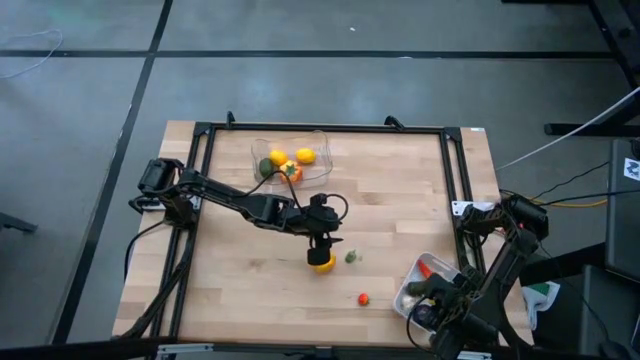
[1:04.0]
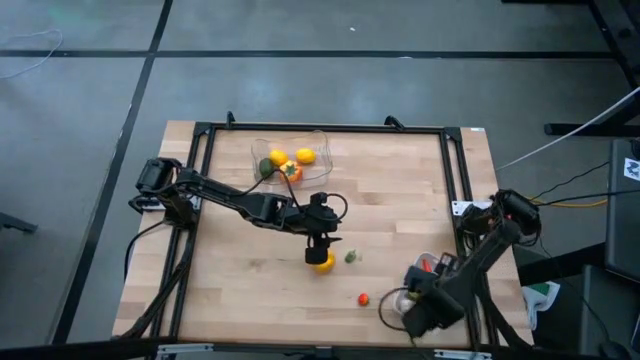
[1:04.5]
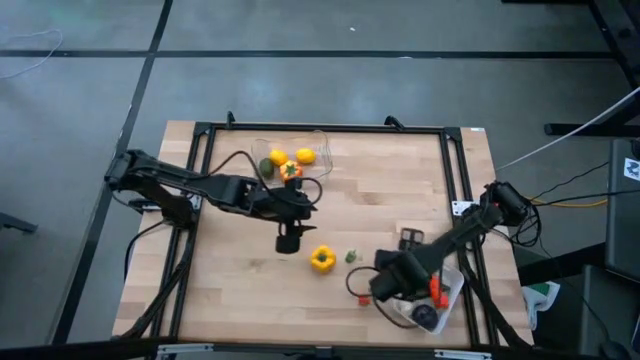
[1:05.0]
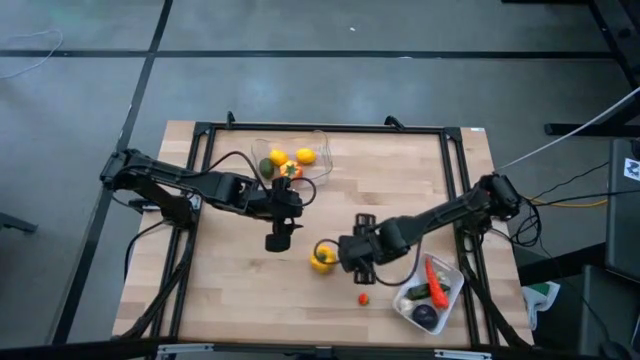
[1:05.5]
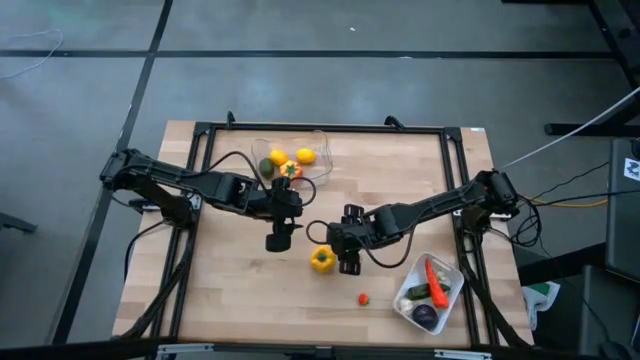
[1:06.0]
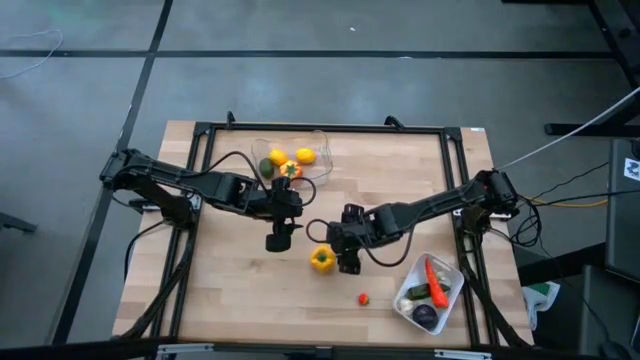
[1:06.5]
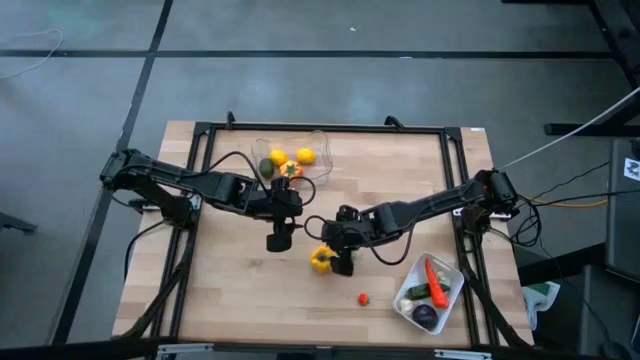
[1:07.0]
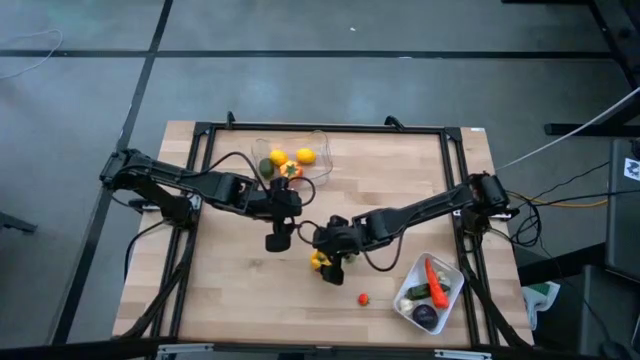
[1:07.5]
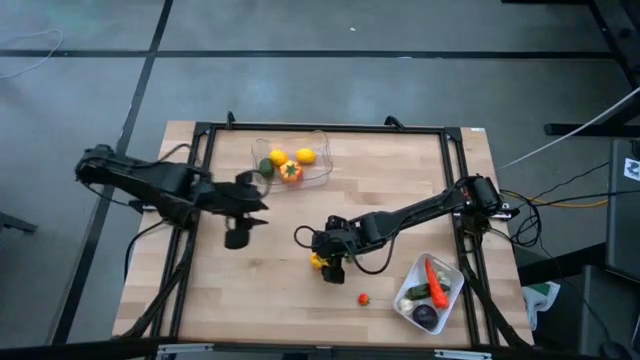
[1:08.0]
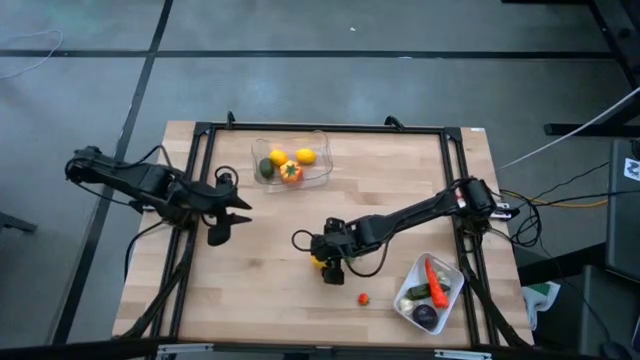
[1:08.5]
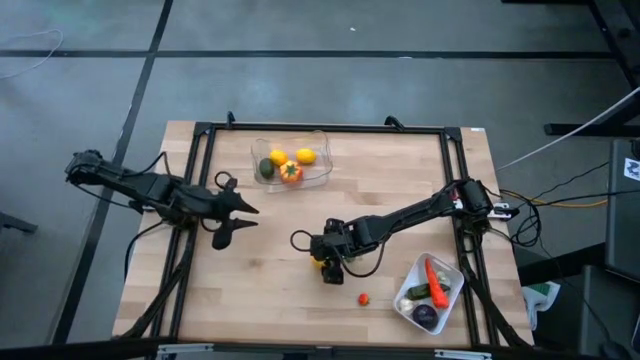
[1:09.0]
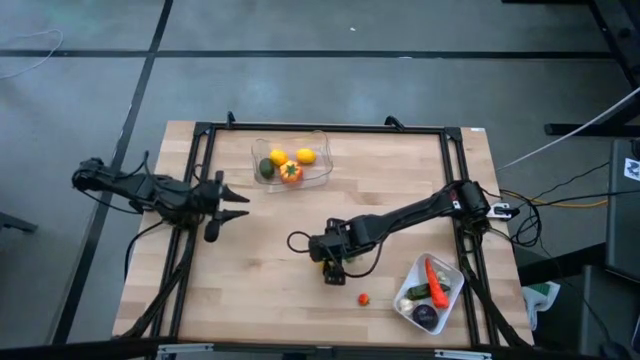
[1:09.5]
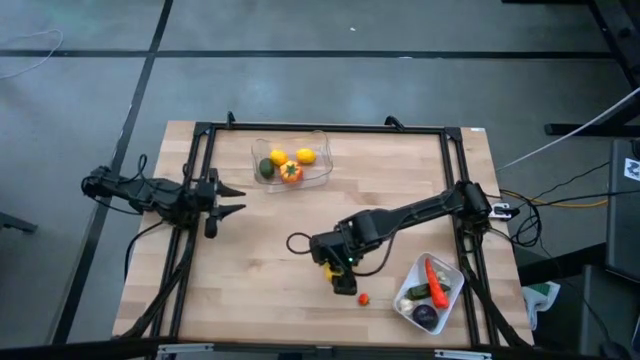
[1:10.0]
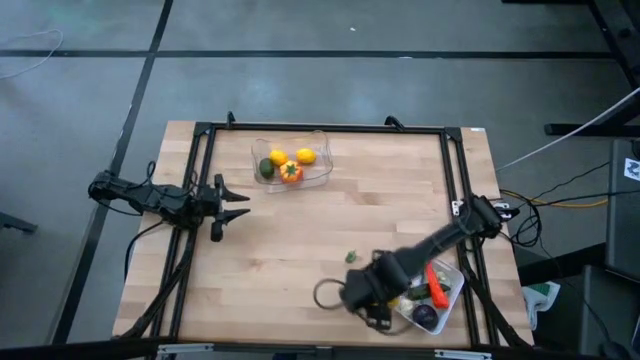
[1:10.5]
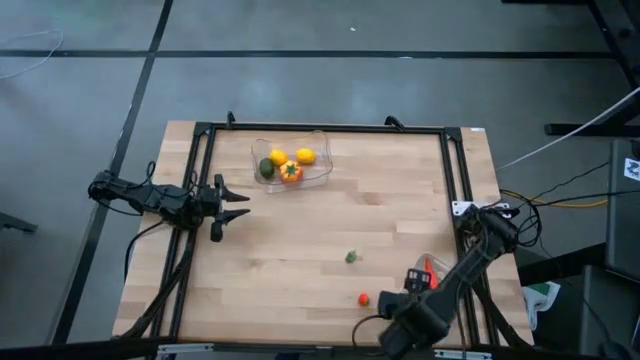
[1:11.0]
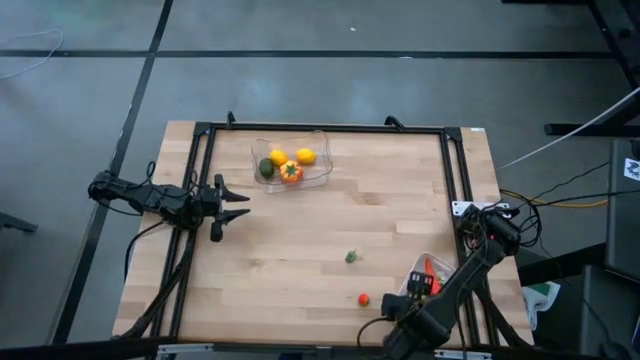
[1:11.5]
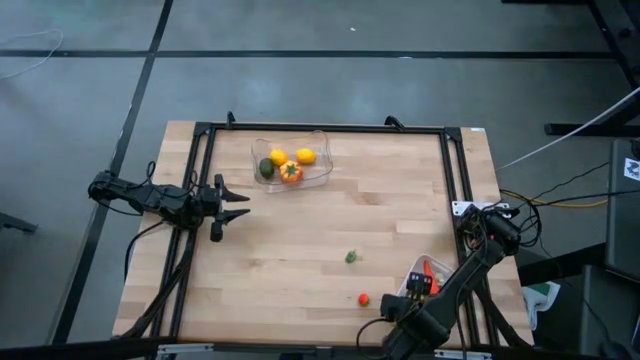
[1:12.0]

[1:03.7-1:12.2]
Task: Sort produce into baskets
Put the yellow bell pepper into the white bin

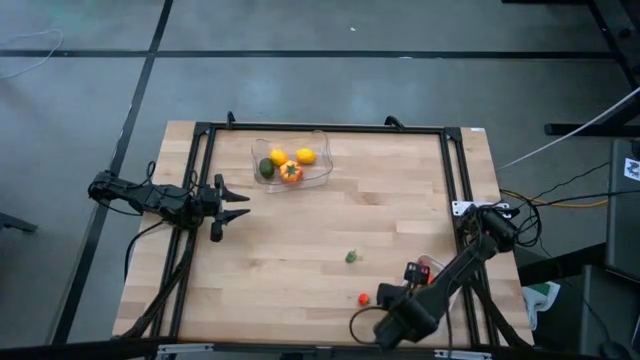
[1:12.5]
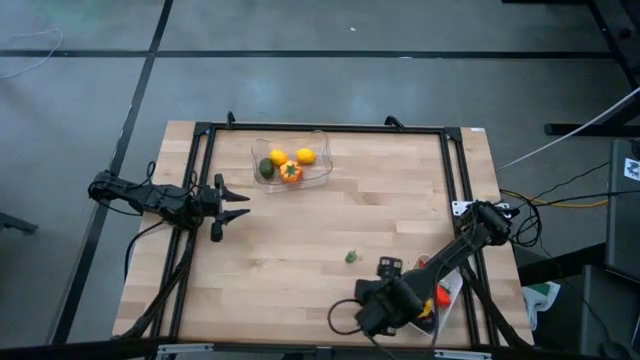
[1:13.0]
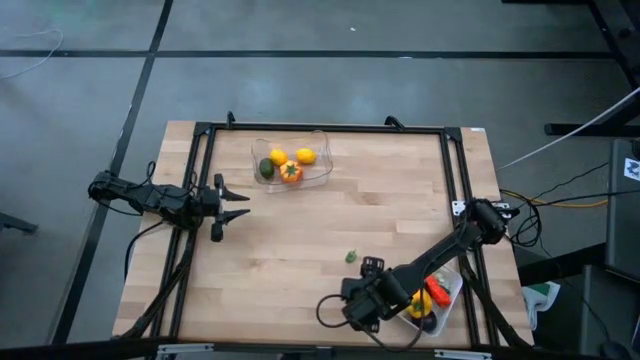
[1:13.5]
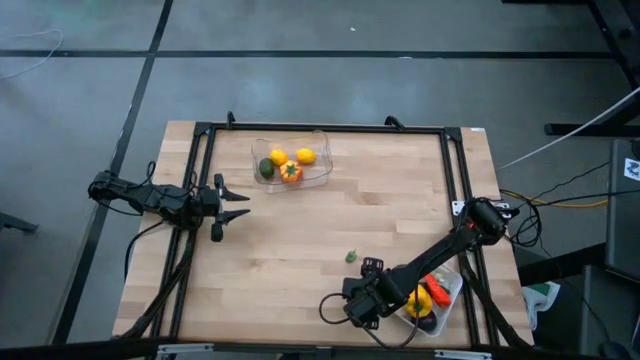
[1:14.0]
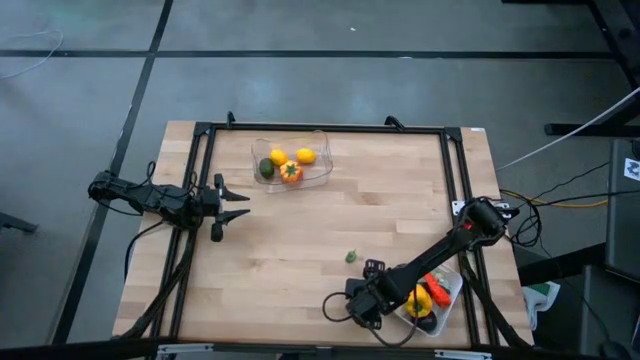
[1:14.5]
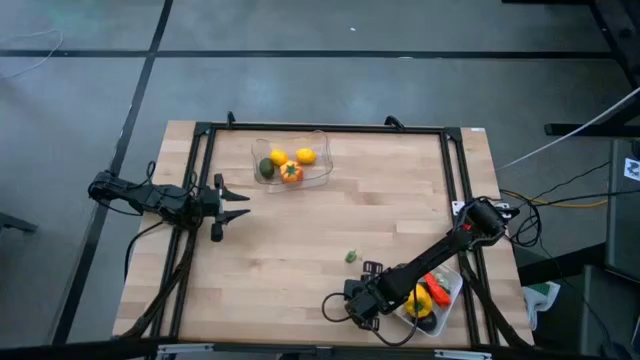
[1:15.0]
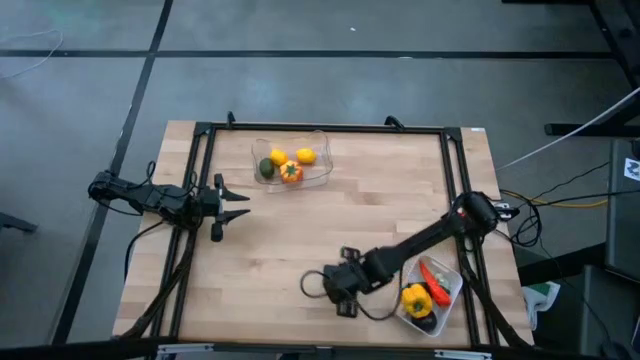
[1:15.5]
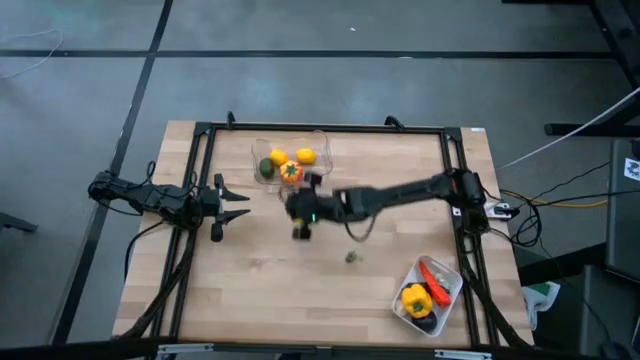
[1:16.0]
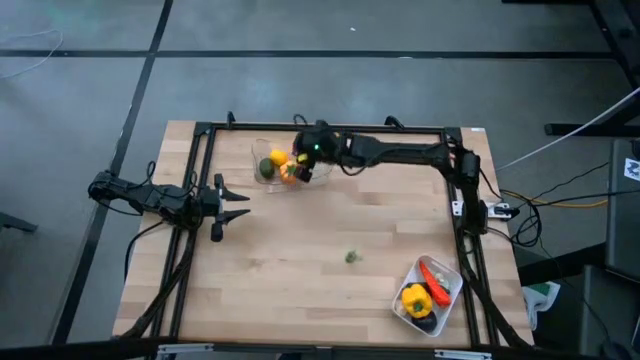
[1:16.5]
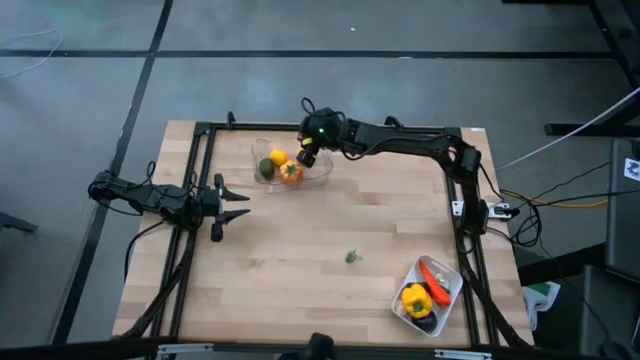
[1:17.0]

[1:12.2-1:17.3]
Put the red tomato into the transparent bin

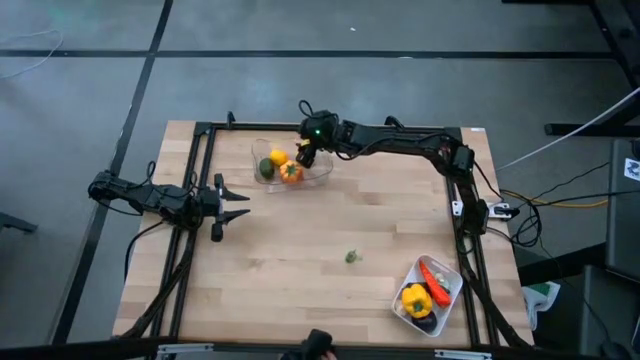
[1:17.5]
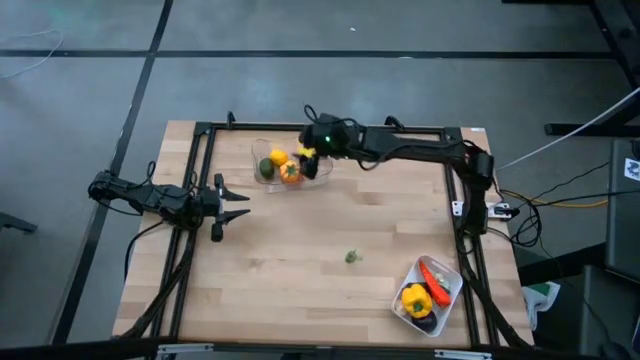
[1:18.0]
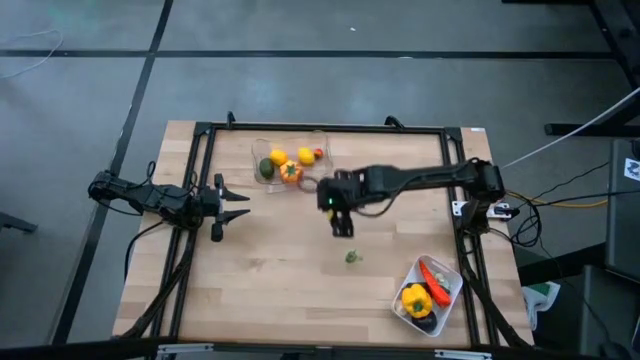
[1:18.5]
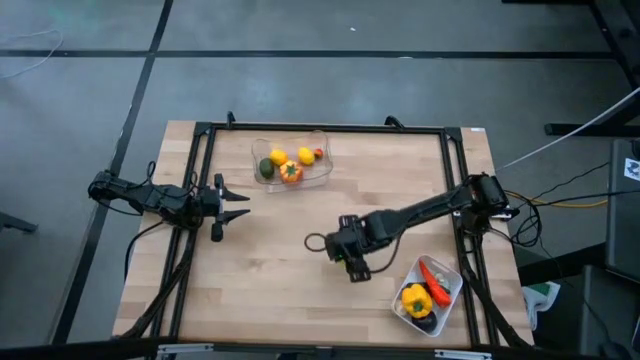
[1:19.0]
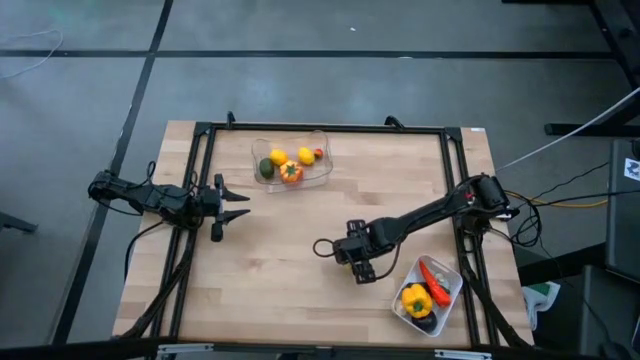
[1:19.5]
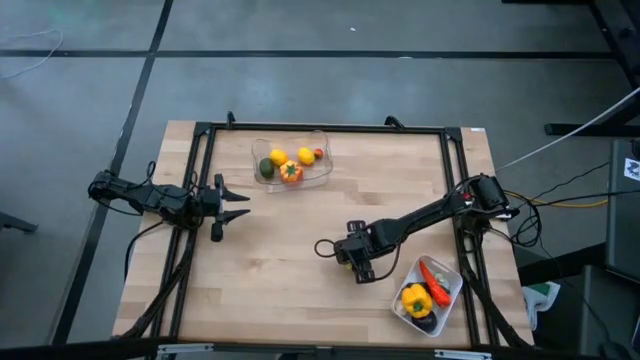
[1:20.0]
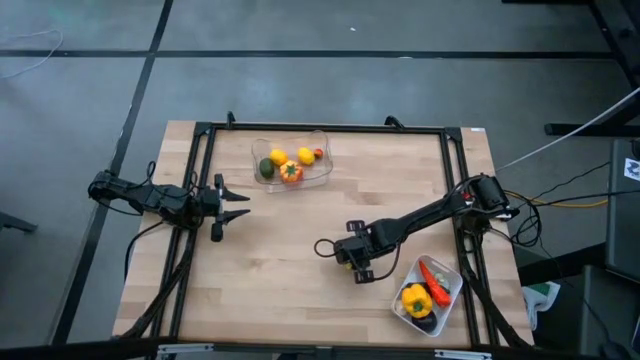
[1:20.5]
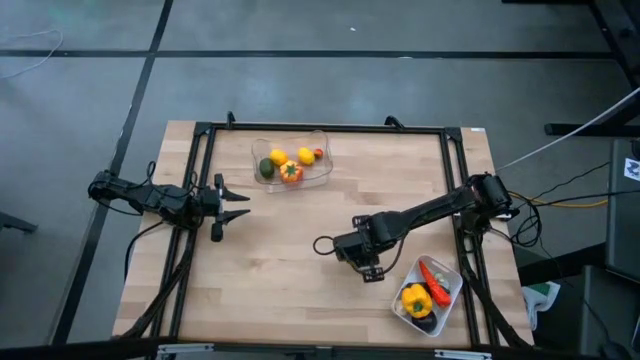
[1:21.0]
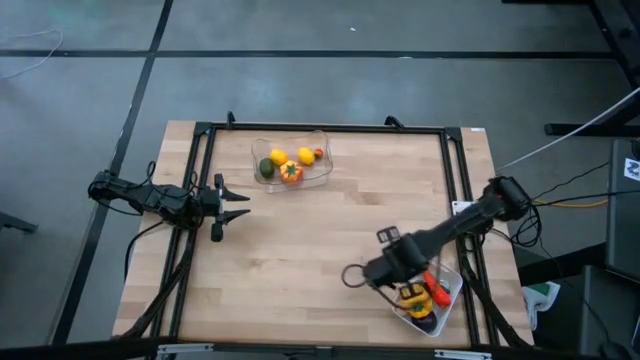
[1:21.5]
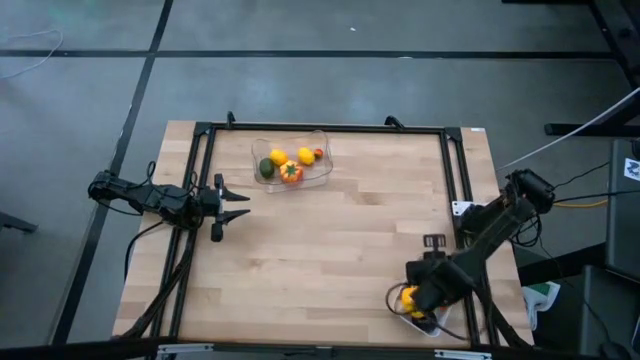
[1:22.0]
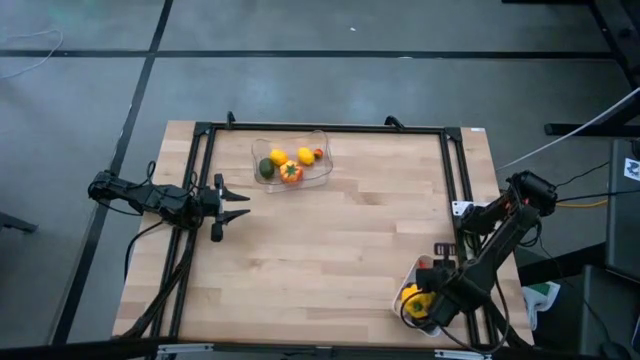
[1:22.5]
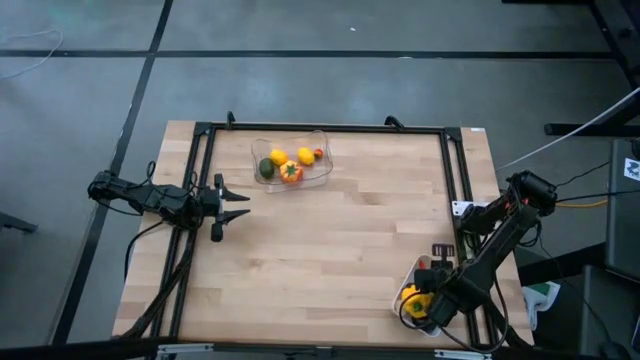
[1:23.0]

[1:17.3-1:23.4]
Put the green chili pepper into the white bin

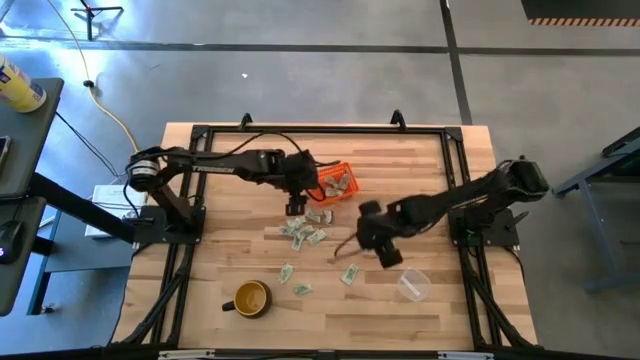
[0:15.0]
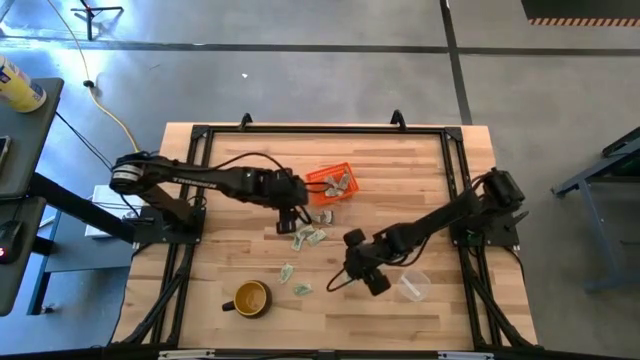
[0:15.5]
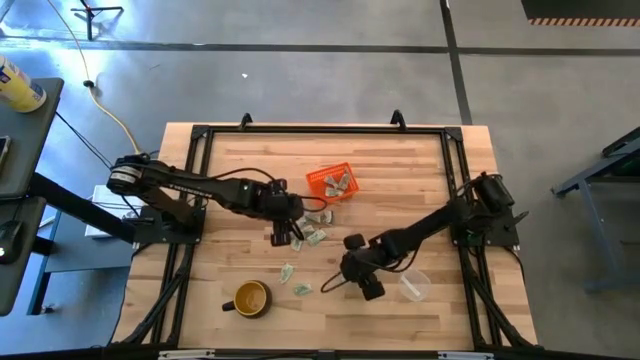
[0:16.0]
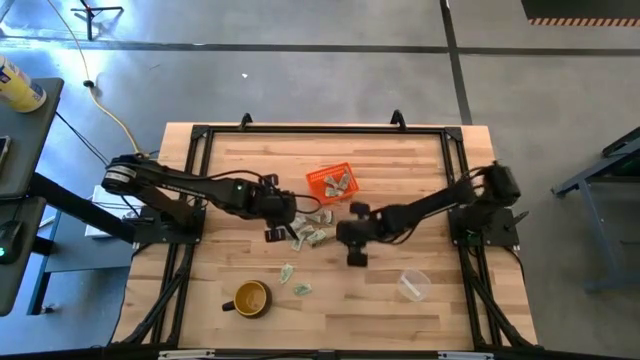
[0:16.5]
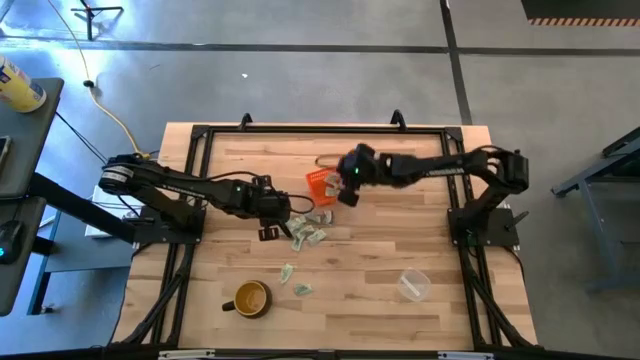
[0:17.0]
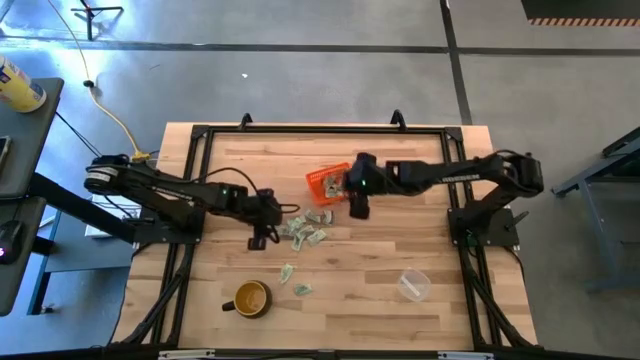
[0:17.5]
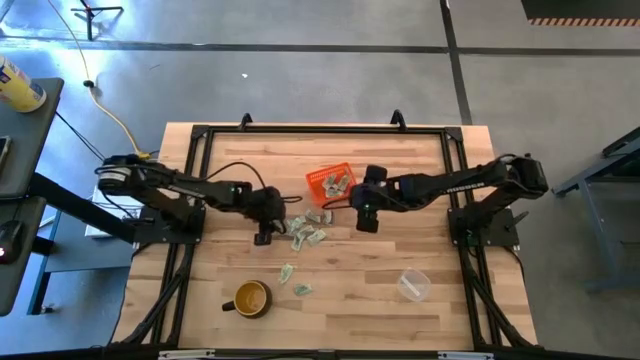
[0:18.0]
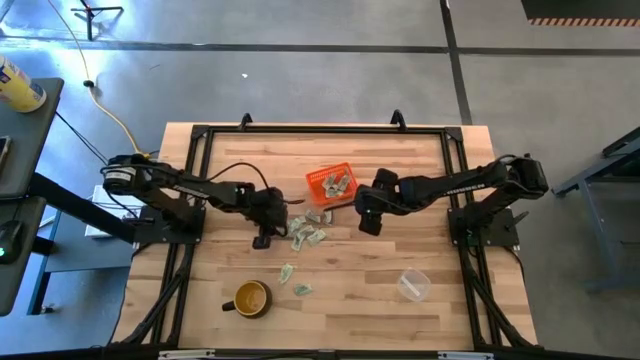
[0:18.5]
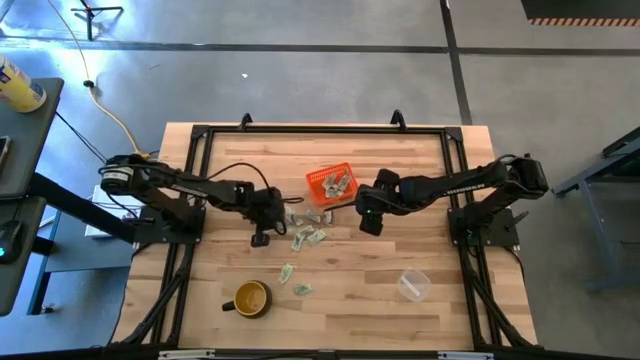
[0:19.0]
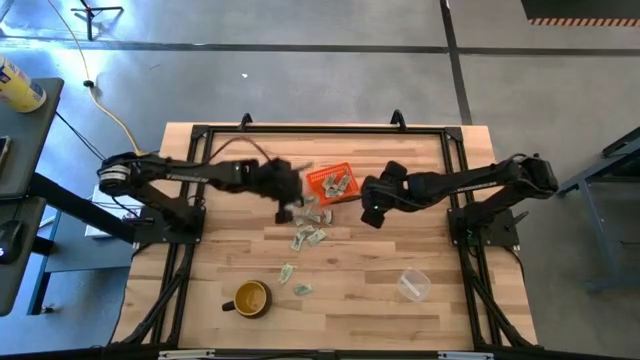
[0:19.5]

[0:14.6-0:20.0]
Task: Pick and place items into bin
Put the white stevia packet into the orange bin
